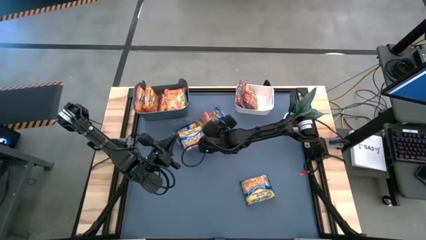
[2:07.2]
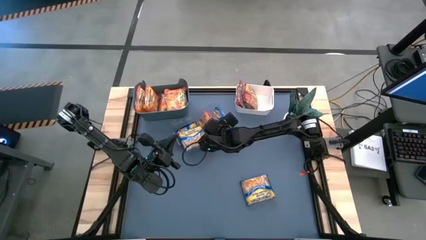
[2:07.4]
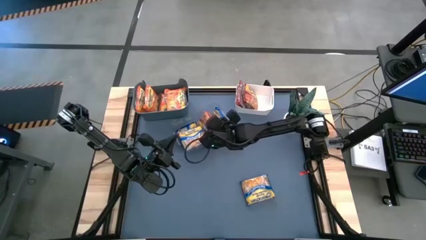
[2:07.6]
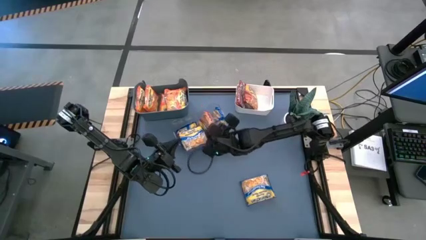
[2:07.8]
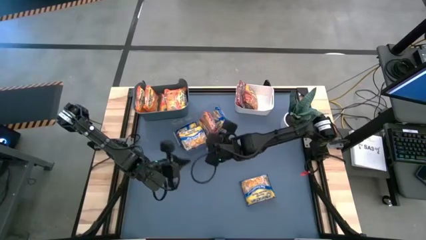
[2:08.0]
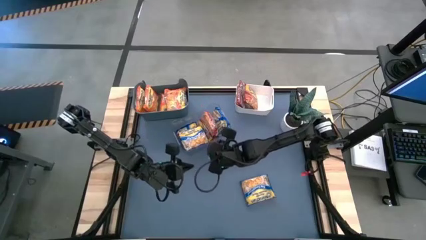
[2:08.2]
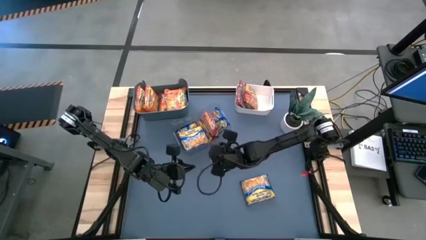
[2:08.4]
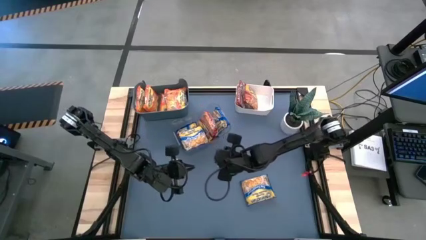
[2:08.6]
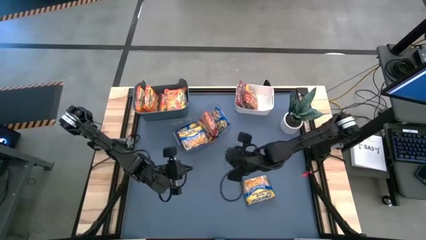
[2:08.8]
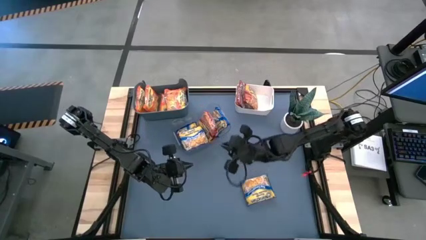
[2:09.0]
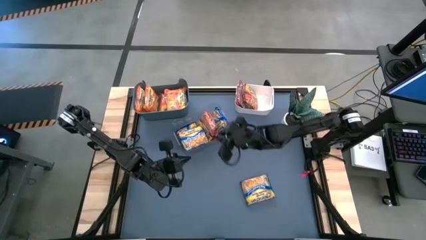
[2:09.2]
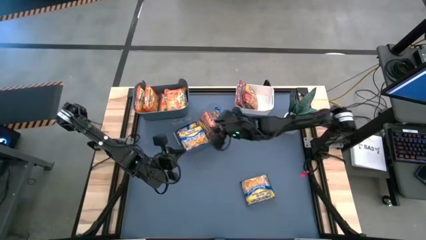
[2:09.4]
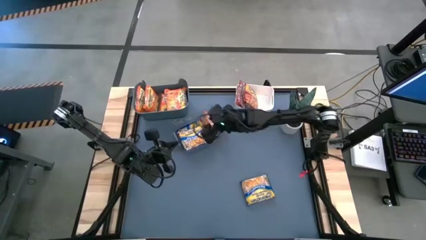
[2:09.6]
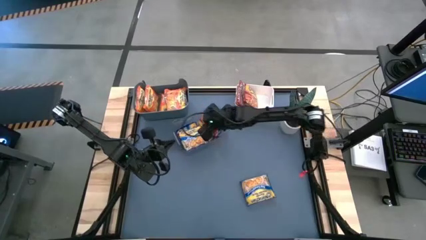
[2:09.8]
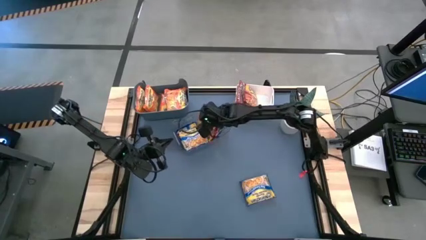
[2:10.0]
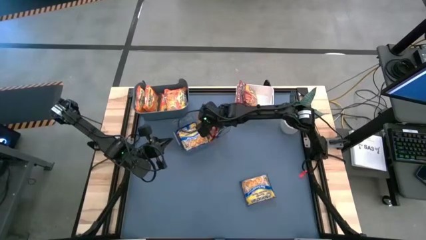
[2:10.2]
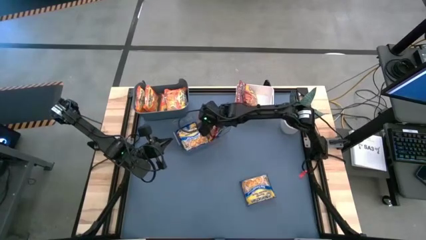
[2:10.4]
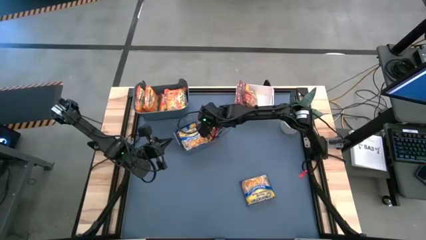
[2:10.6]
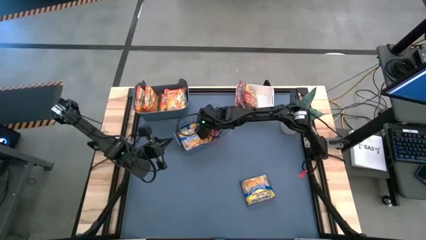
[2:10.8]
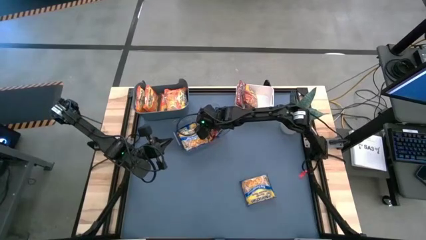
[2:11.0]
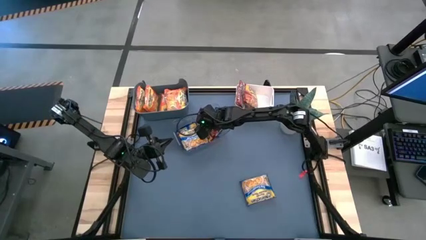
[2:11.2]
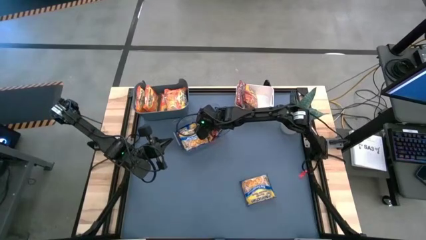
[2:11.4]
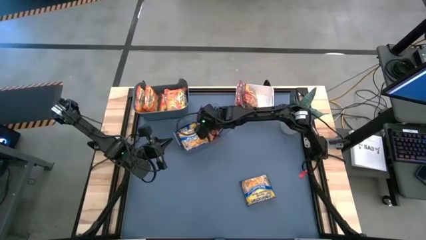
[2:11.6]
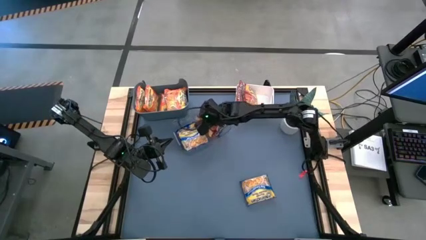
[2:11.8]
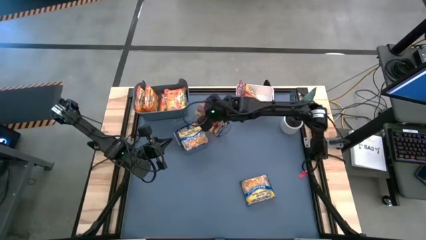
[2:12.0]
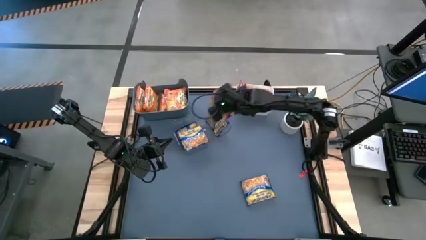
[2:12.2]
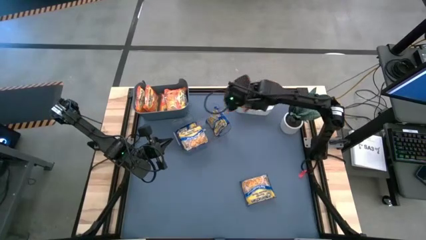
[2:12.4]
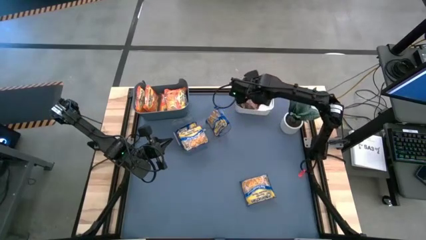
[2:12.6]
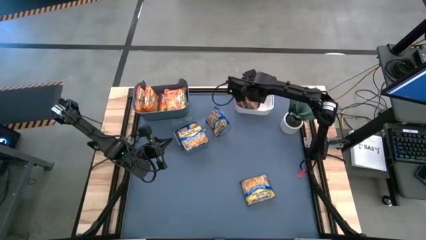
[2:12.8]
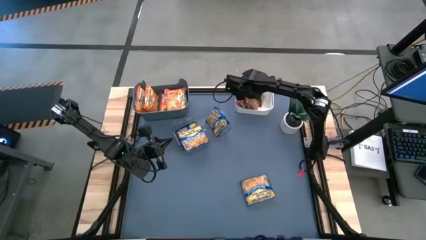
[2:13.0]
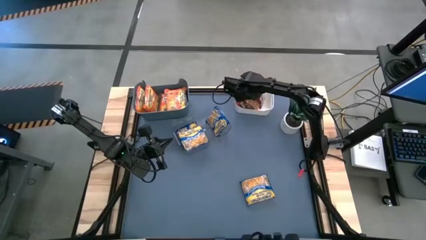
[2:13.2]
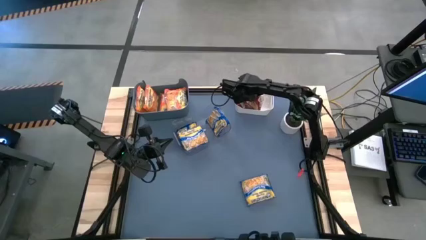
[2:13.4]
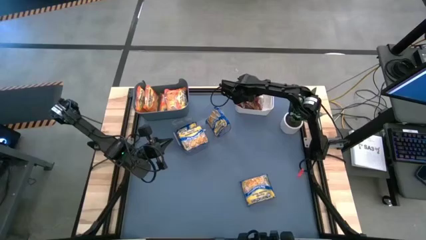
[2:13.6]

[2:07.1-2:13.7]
Task: Sort Maruchan noodles
Put the red noodle pack into the white bin

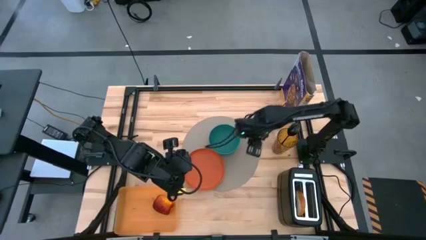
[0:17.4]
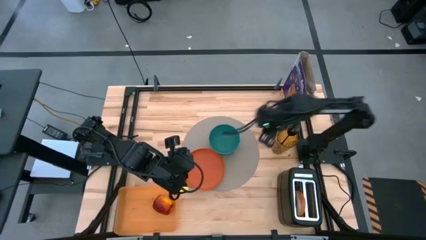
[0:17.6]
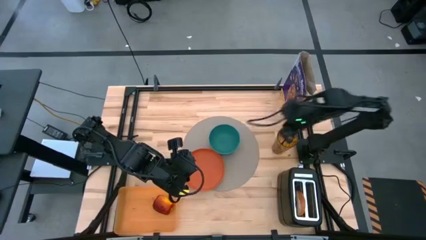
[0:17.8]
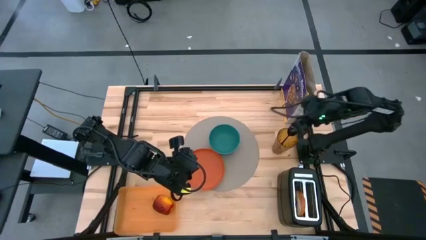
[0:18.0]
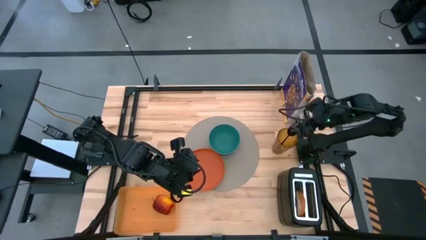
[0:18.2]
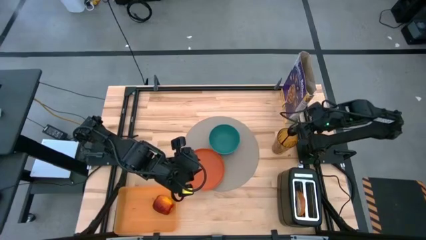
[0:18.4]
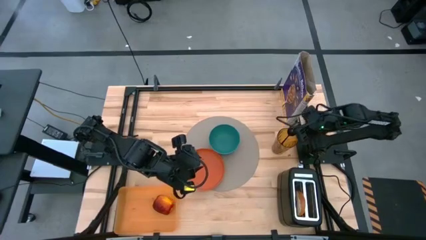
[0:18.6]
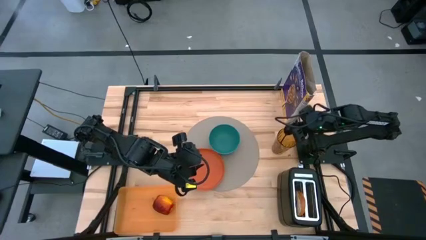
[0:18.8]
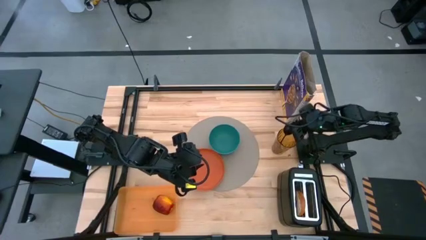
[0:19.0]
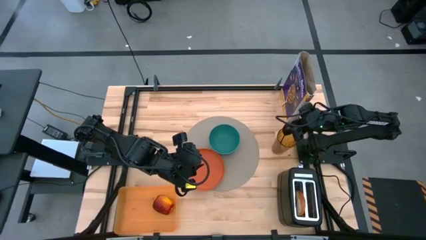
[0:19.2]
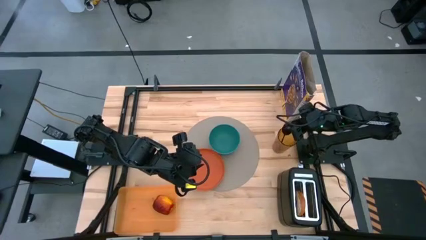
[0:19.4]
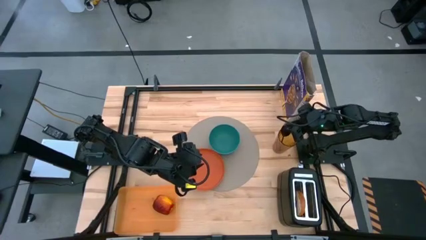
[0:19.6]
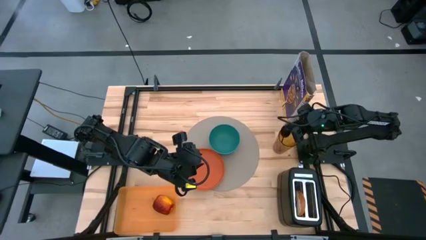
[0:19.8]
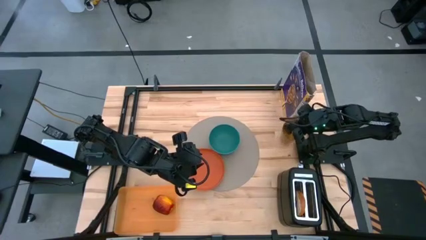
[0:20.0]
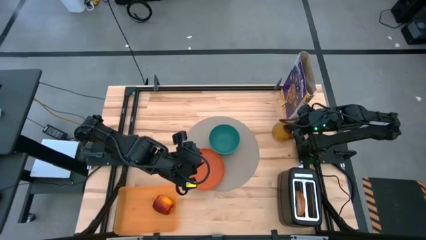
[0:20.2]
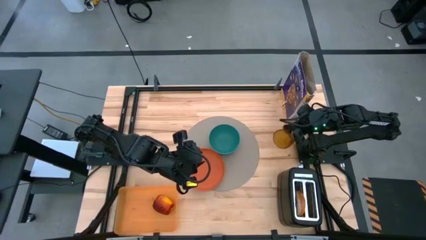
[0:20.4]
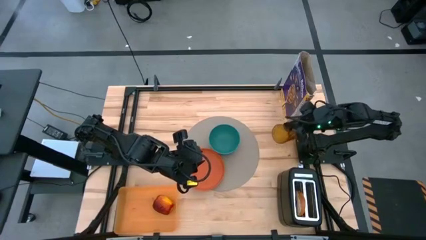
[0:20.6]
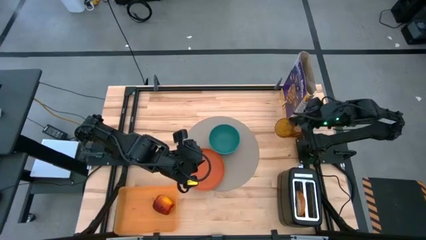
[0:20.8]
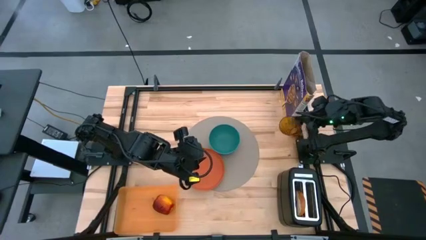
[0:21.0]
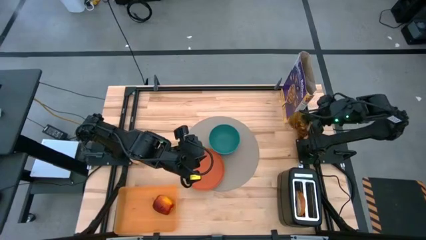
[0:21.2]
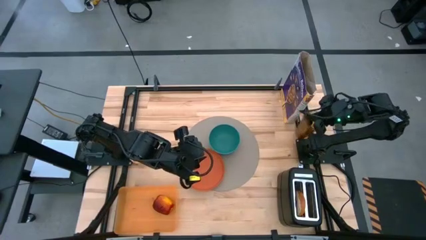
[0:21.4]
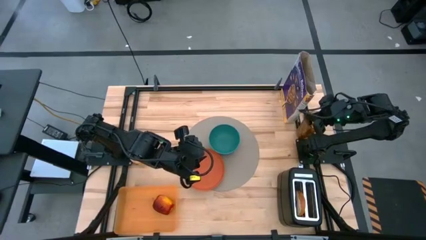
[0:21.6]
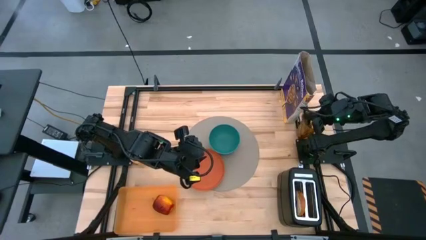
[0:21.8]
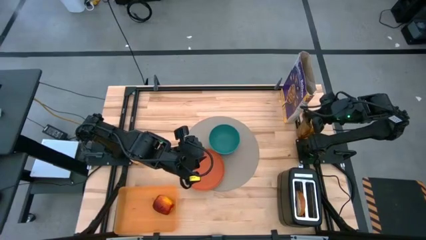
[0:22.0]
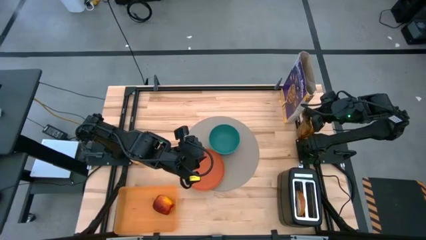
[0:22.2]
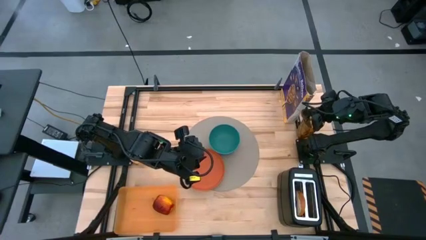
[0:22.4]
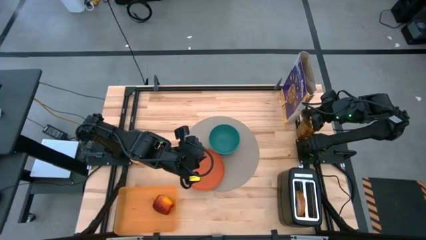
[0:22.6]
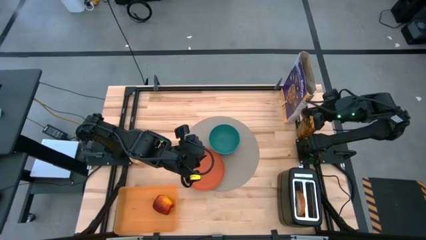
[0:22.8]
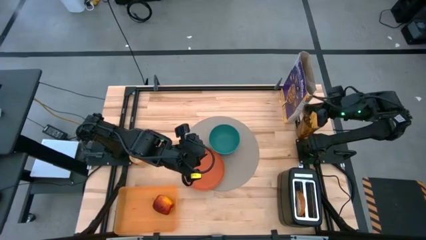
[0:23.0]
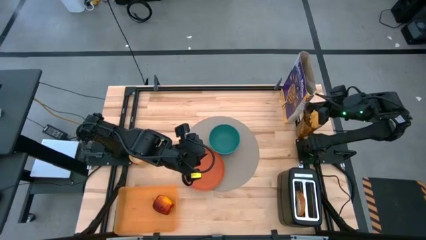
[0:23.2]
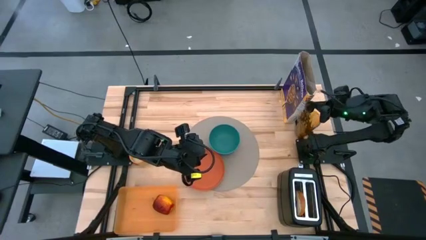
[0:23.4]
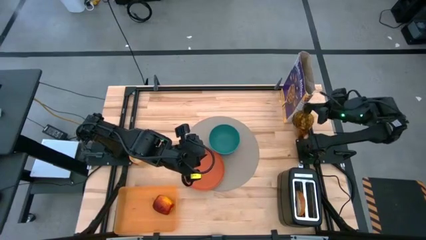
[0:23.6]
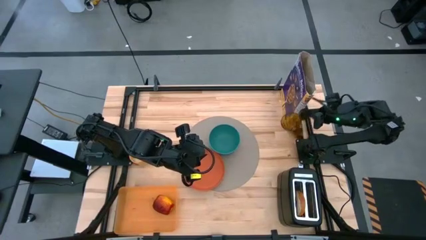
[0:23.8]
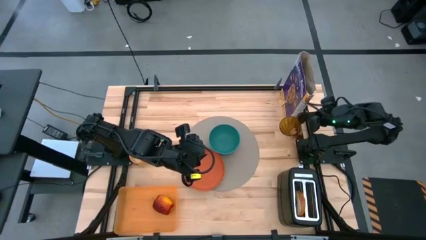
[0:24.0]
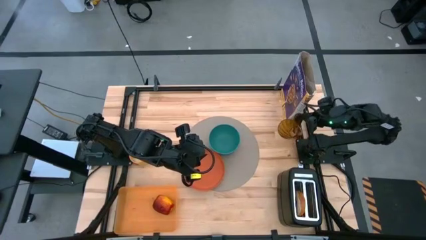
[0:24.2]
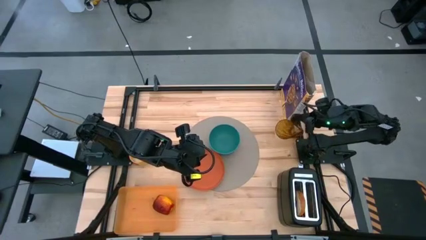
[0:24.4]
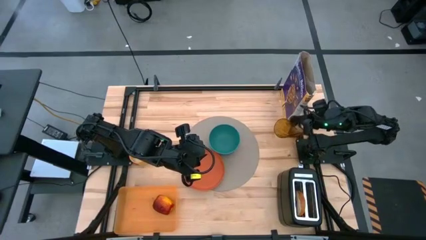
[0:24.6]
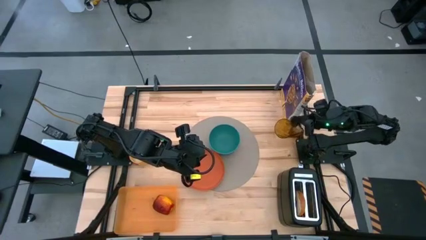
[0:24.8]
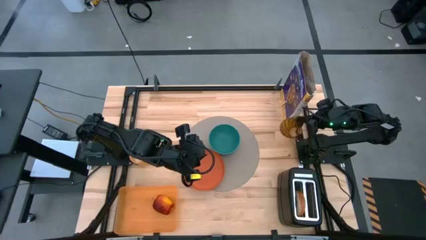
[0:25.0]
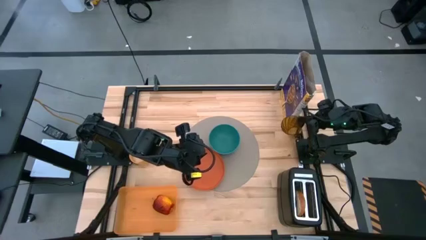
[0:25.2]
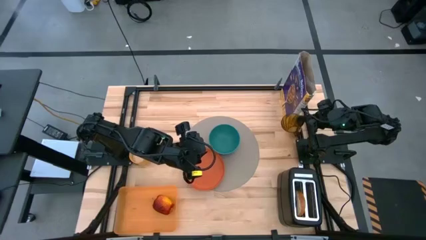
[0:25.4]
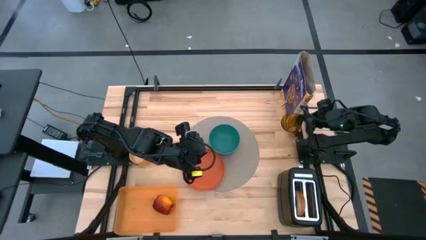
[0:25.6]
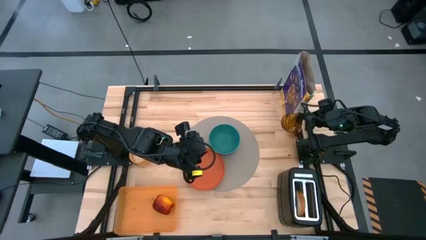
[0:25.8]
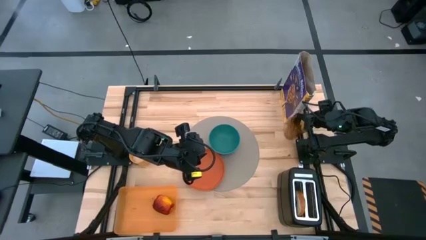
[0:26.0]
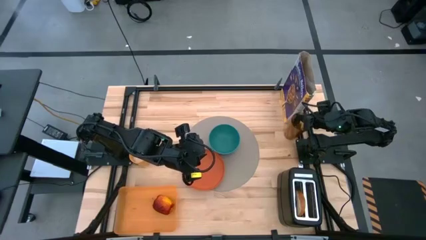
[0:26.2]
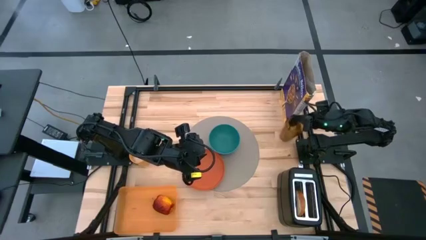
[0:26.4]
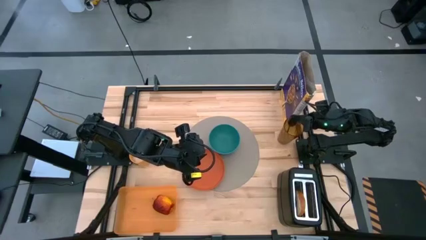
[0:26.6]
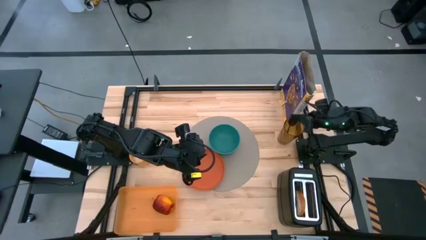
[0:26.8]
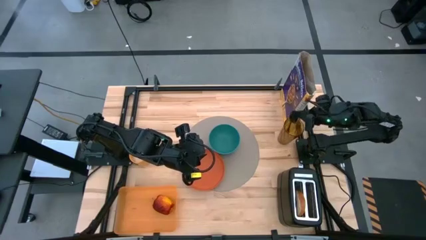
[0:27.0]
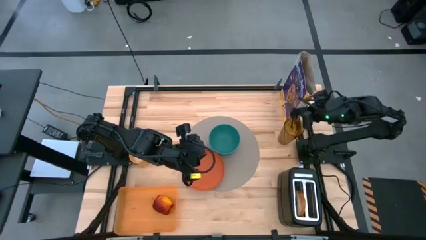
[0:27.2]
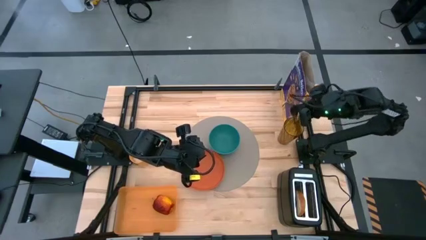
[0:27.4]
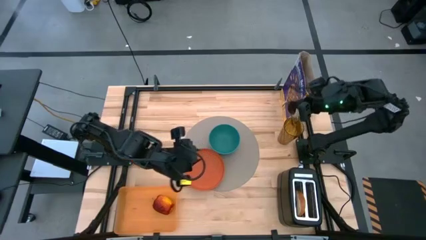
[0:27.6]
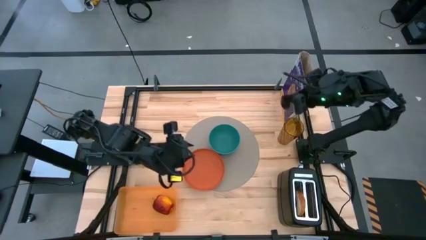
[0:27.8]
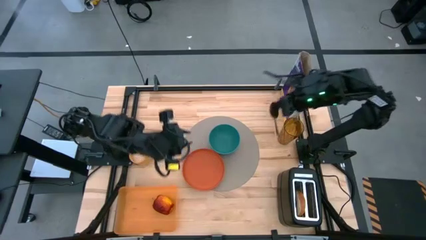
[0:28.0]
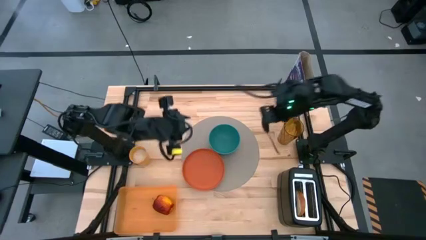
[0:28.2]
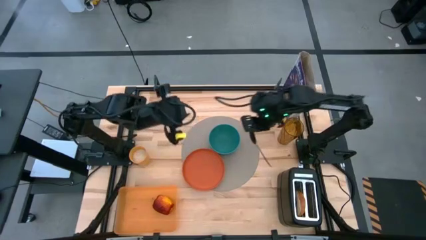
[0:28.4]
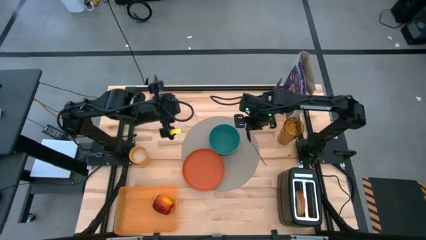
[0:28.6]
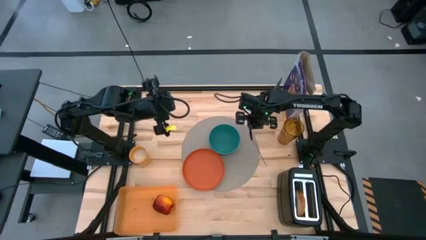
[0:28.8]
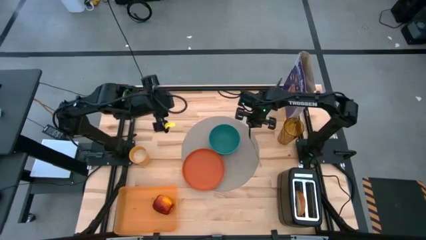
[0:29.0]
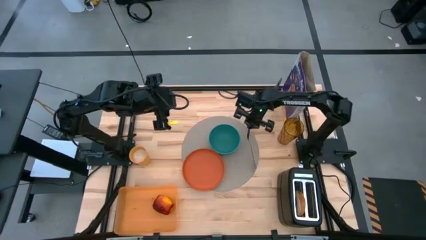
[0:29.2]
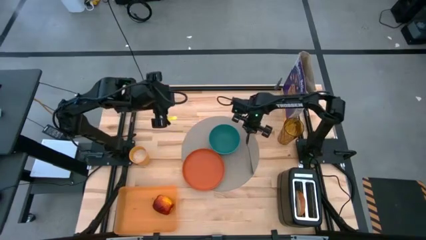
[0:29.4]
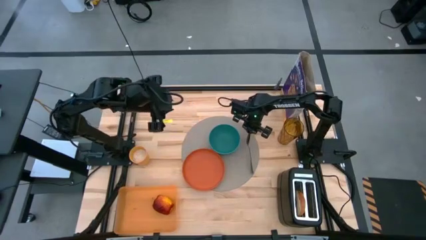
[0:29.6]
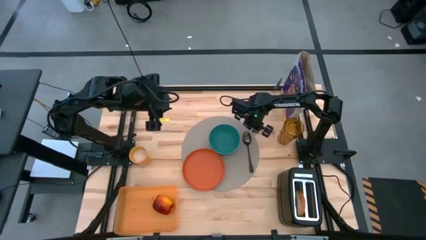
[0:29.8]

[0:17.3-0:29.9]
Task: Arrange a breakfast setting
Put the spoon on the placemat right of the bowl
